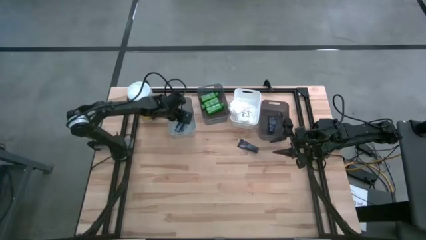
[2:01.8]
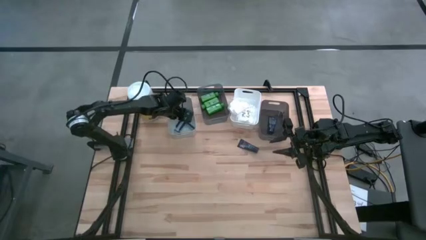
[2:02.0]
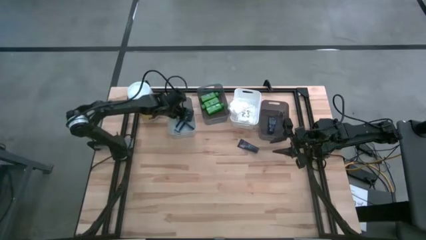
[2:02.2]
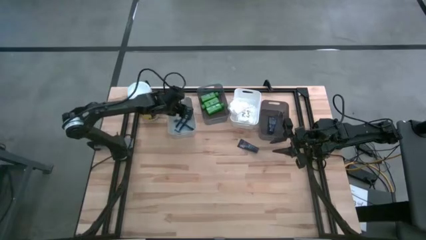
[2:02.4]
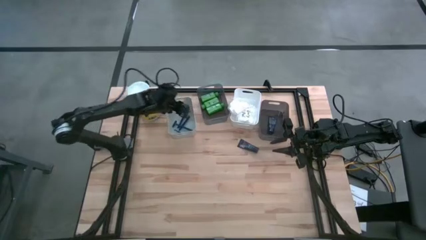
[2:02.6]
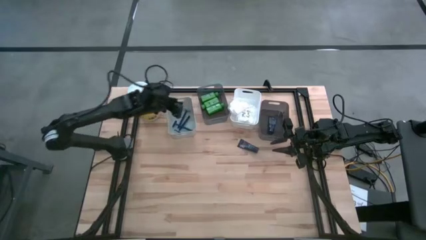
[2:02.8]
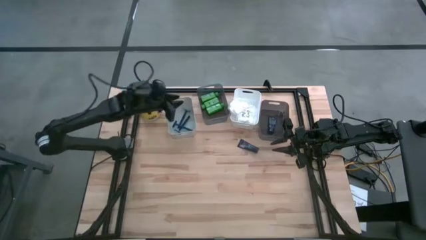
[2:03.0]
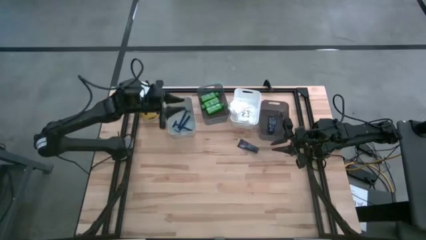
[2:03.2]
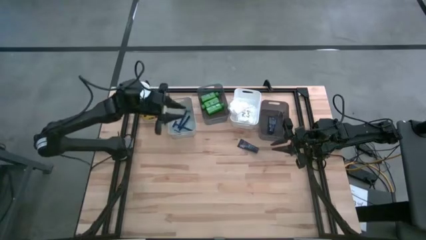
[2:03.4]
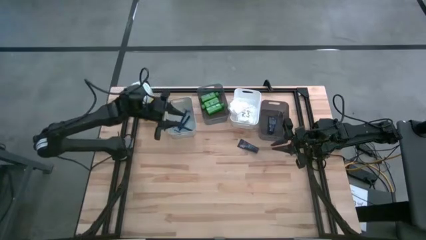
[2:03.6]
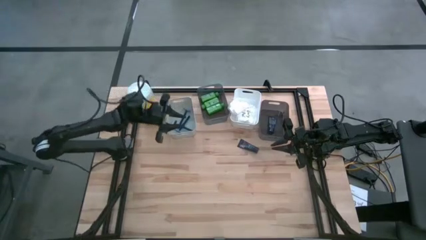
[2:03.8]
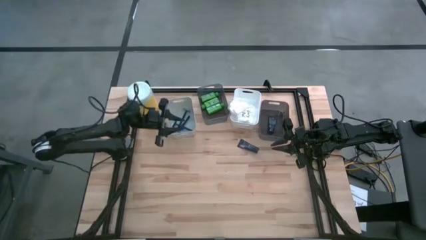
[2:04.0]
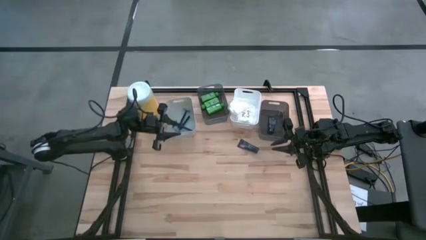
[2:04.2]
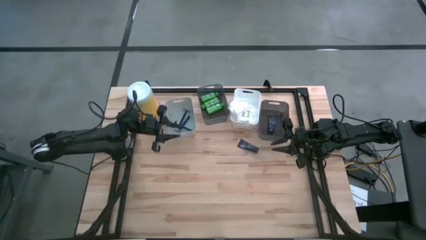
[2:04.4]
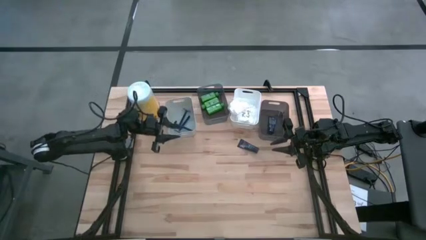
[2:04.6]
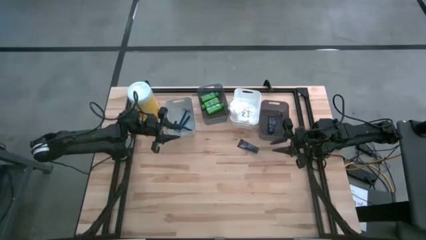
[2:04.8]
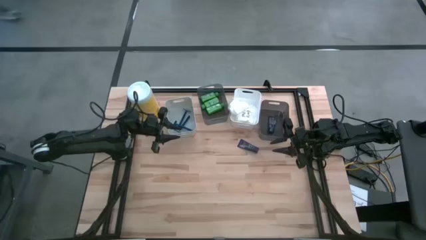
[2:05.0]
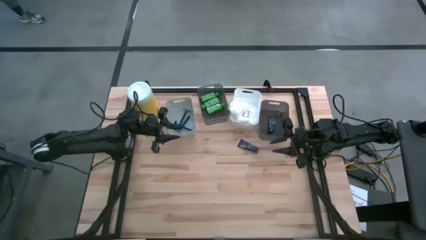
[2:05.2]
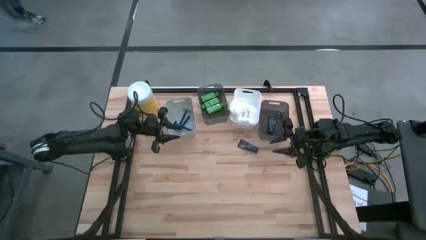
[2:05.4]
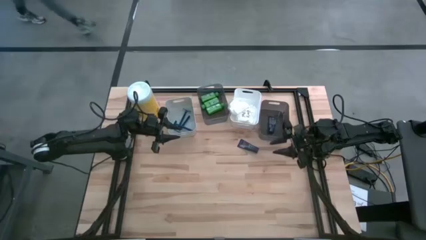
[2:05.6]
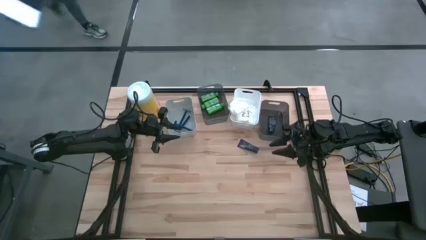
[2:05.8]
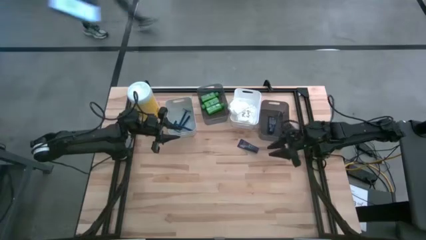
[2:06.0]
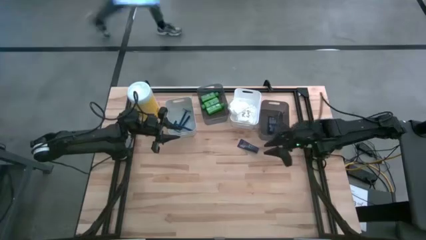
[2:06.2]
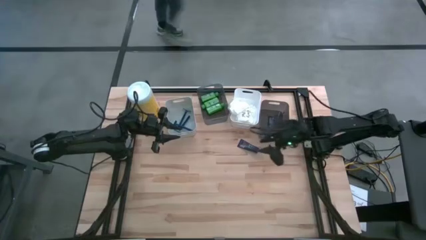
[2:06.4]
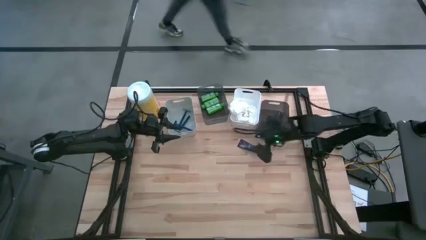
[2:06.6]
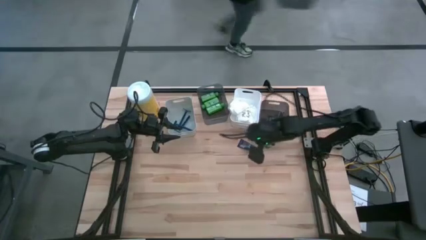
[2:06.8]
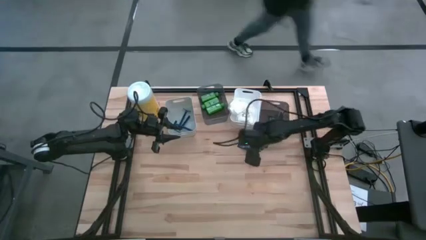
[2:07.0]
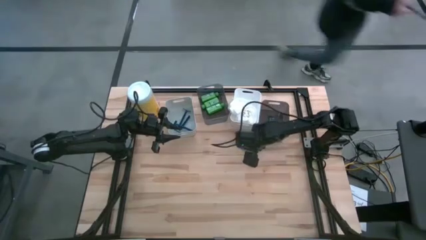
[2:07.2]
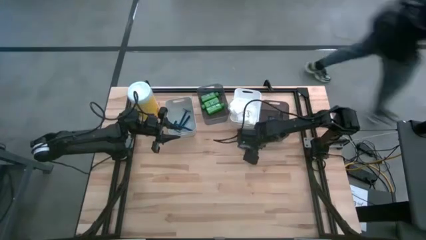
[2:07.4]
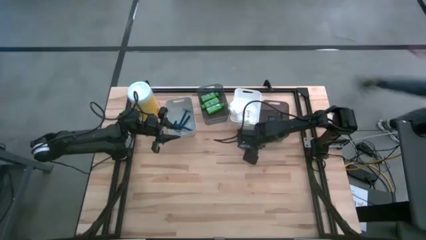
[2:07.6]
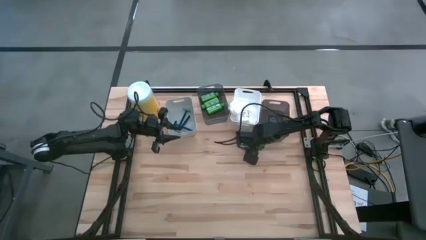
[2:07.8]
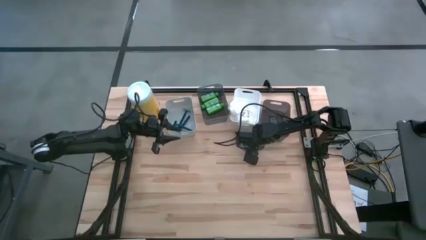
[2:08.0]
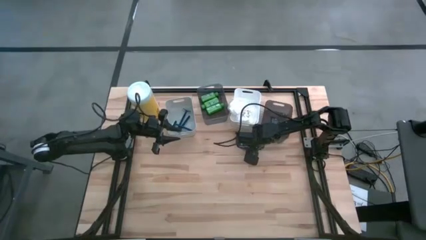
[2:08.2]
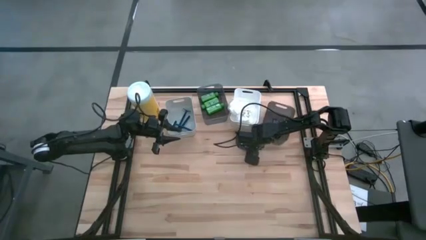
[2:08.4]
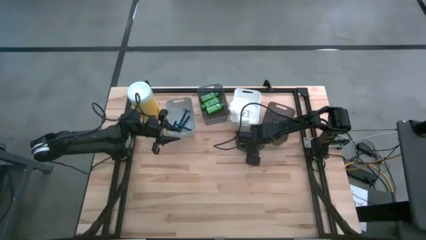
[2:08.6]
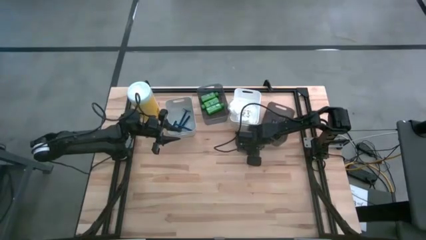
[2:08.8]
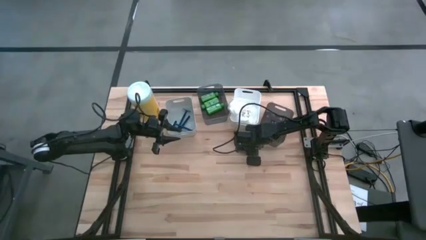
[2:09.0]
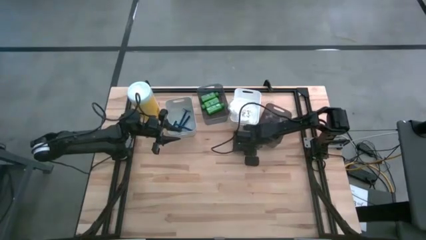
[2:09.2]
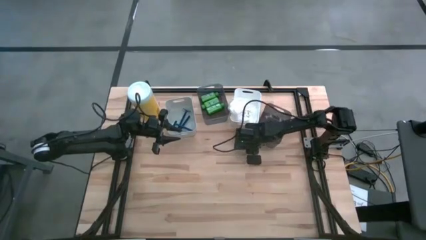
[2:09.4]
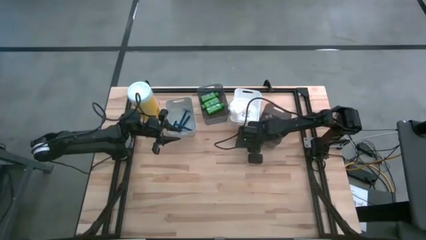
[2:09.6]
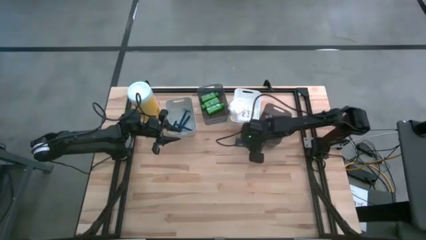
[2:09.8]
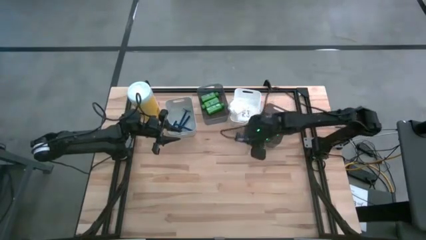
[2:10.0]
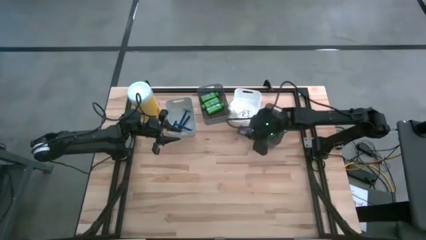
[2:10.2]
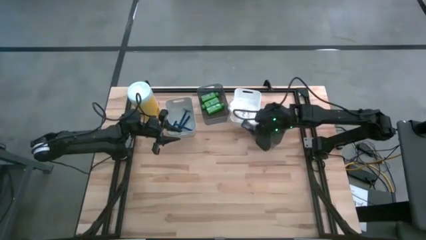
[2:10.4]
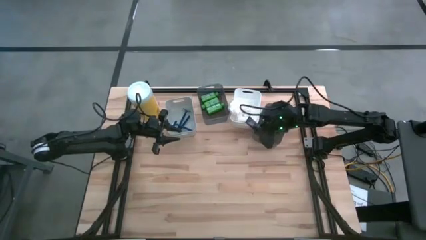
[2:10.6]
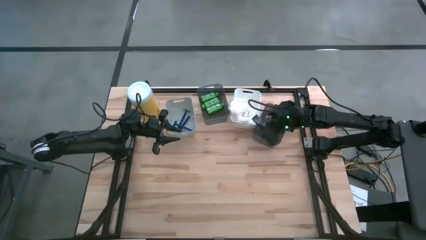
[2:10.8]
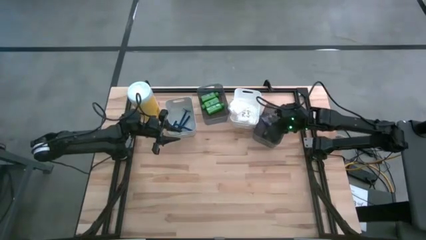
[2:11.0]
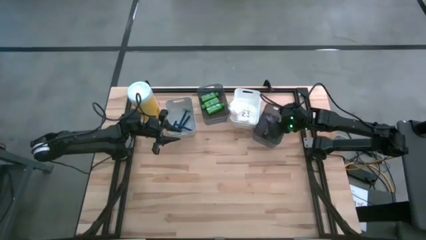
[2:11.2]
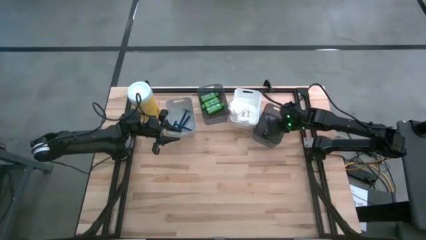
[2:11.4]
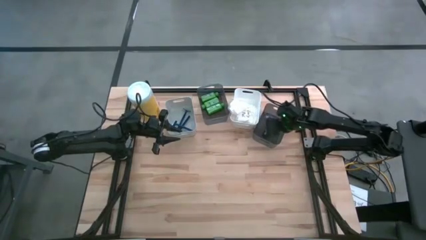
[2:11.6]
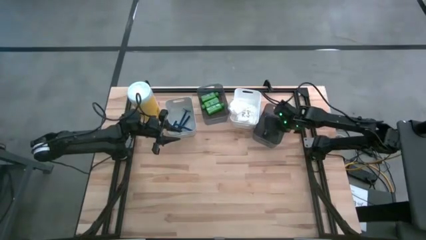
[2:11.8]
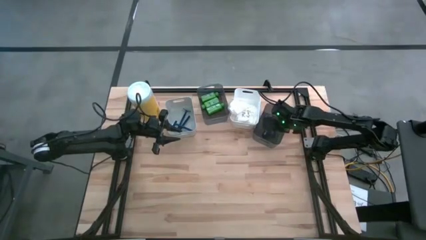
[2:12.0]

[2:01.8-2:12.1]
Task: Pick & Place Travel size toiletries
Put the blue shave cream into the bottom black bin

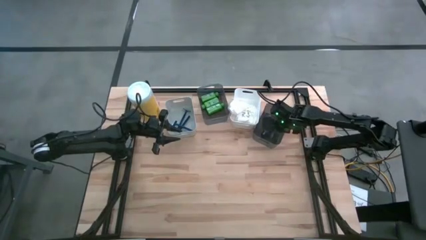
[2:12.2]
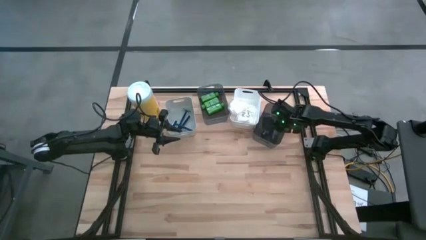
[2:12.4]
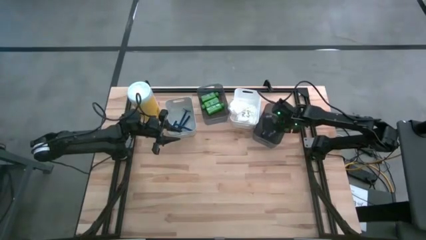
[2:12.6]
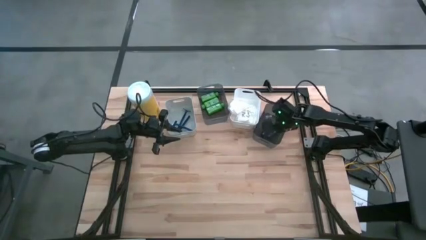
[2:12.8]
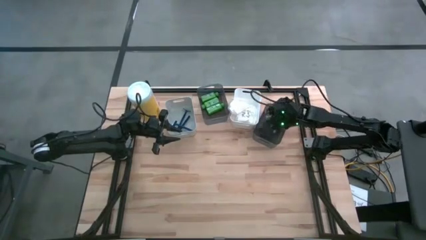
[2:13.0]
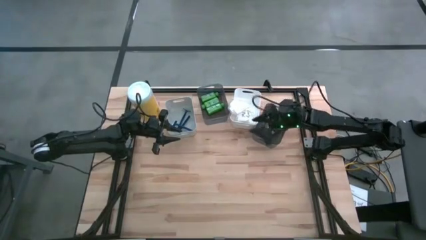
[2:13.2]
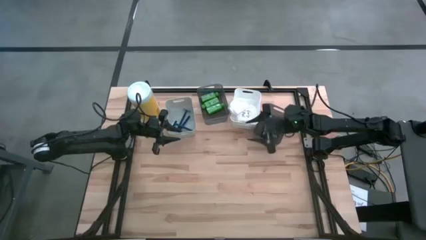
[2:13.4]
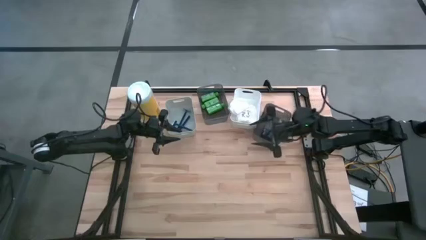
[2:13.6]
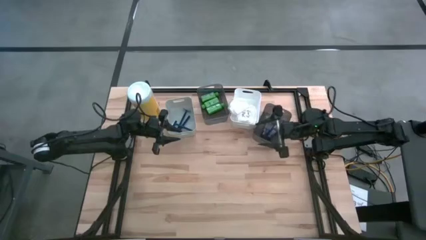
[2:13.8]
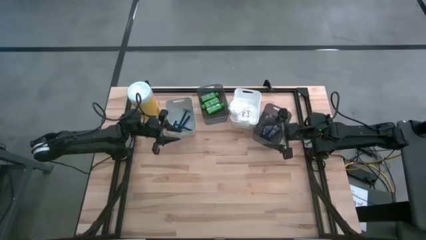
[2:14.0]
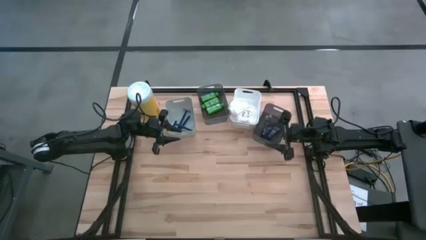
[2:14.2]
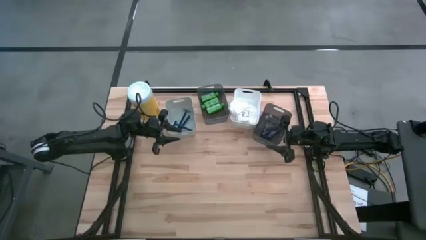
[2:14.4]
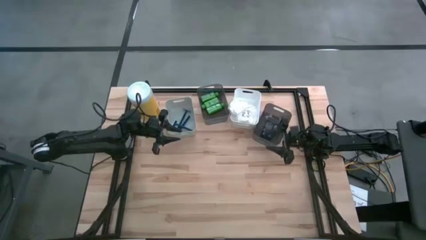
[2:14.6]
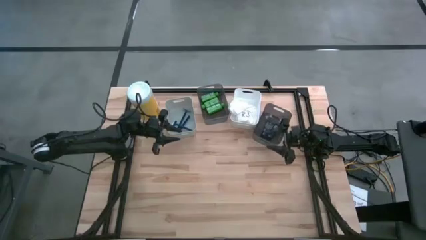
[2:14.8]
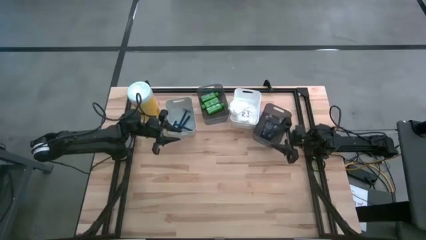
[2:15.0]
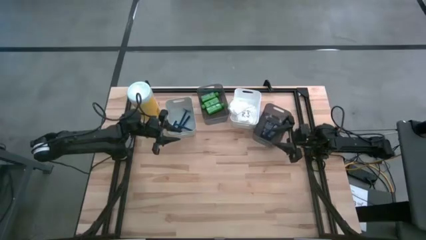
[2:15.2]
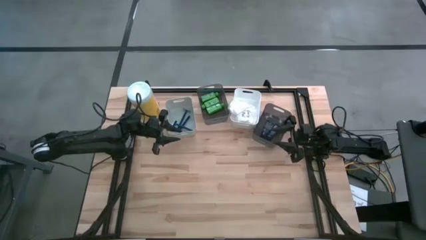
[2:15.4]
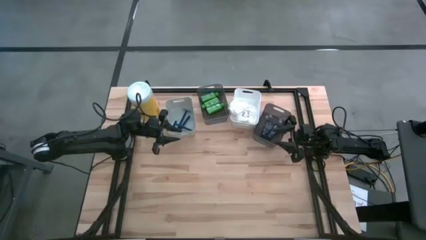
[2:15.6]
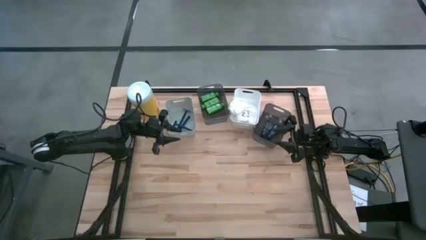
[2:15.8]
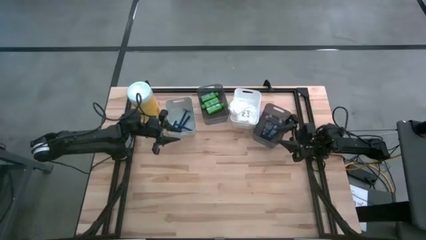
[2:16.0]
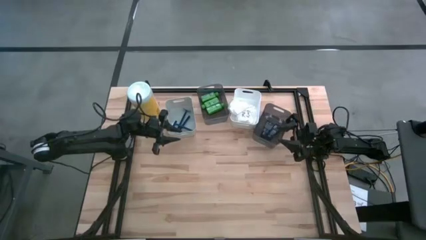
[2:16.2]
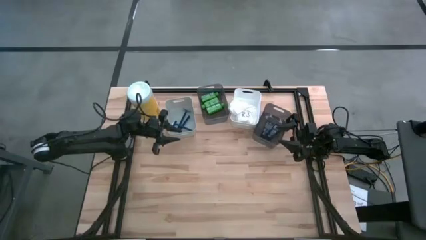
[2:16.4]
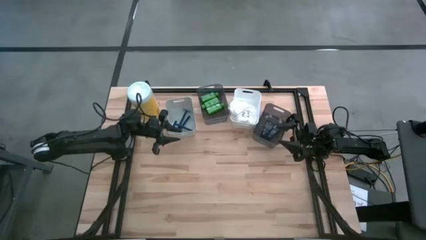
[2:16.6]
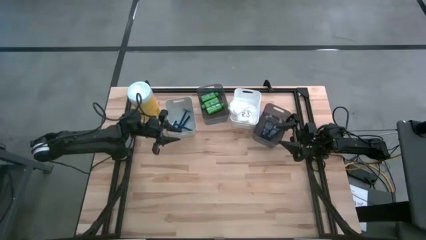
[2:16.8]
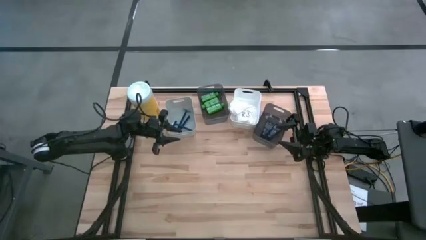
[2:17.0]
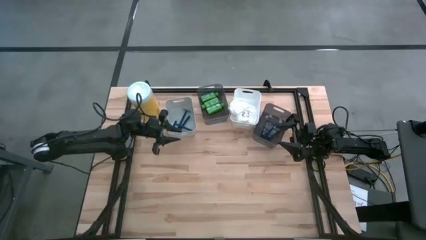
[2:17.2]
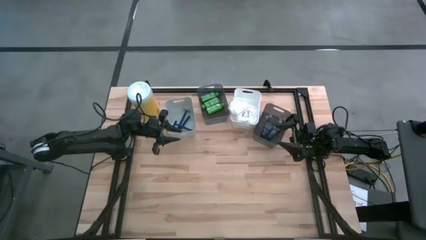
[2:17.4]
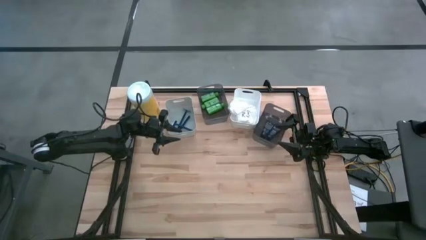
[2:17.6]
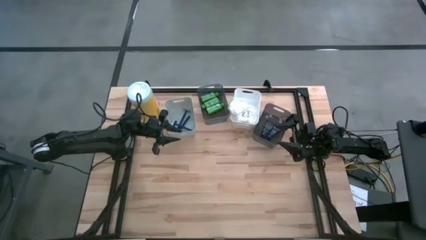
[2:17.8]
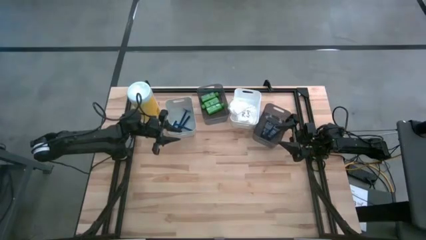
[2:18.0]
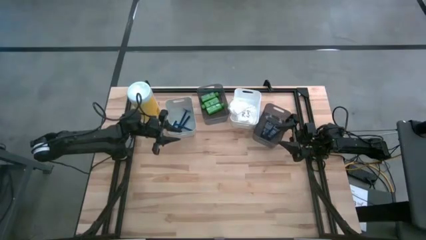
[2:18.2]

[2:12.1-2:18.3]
Return to Home Position
